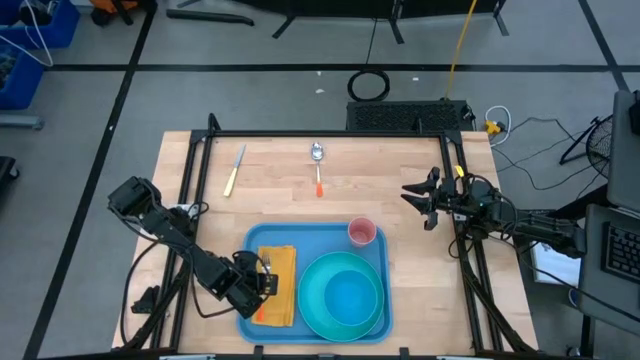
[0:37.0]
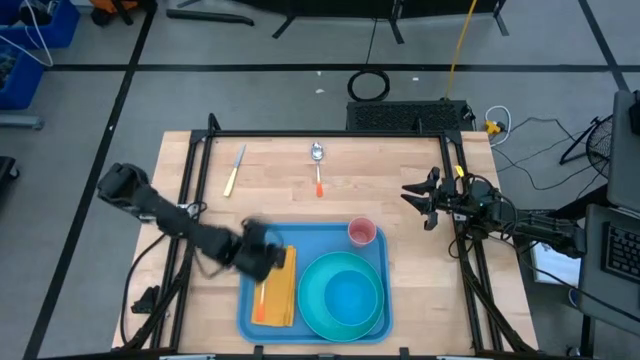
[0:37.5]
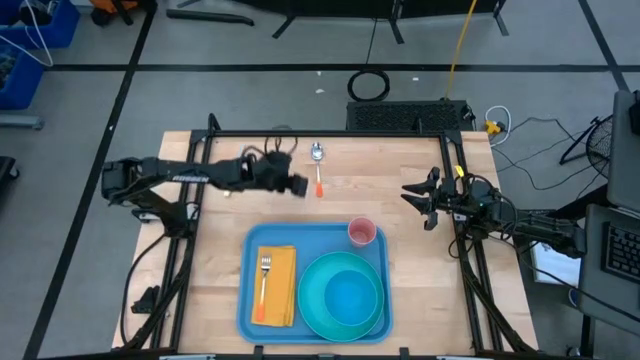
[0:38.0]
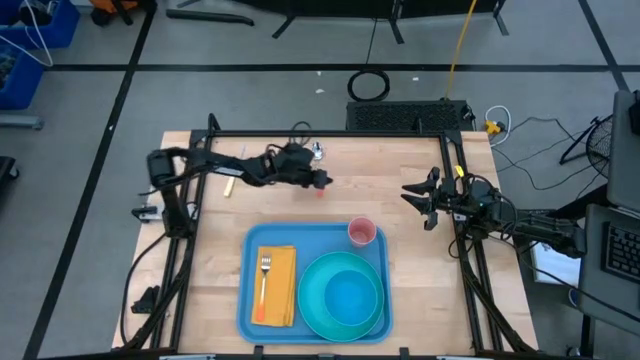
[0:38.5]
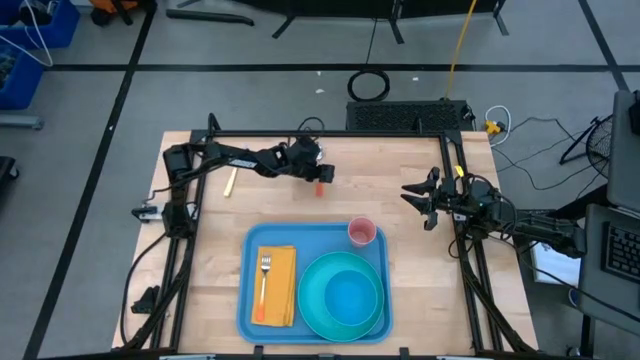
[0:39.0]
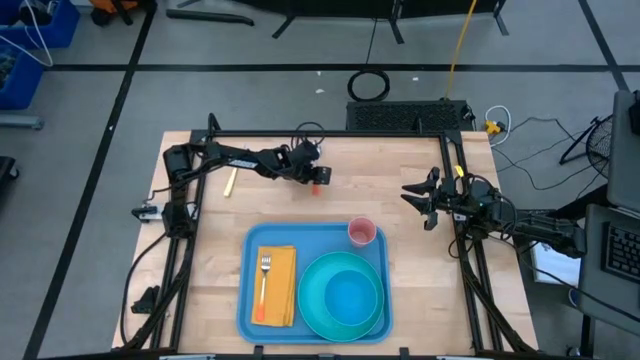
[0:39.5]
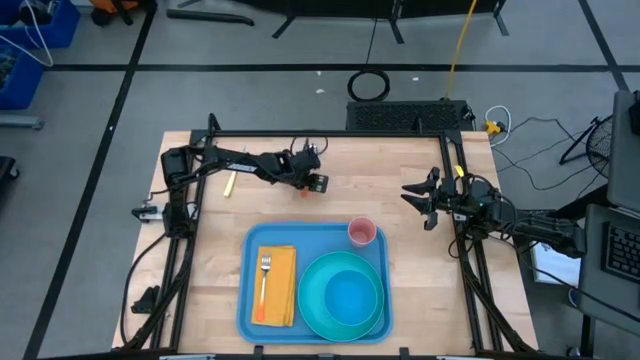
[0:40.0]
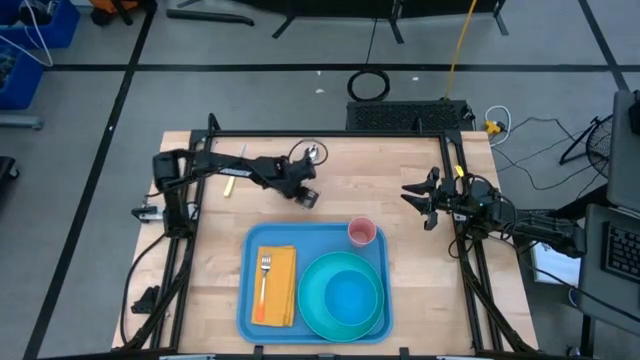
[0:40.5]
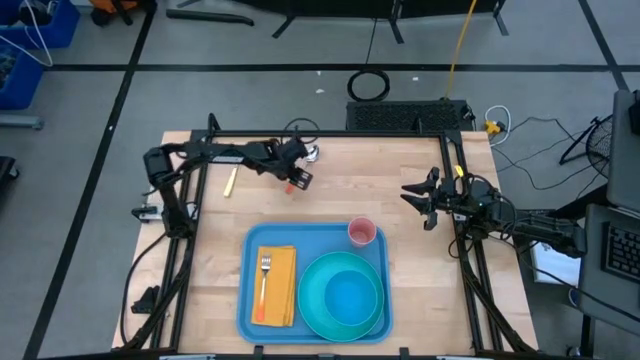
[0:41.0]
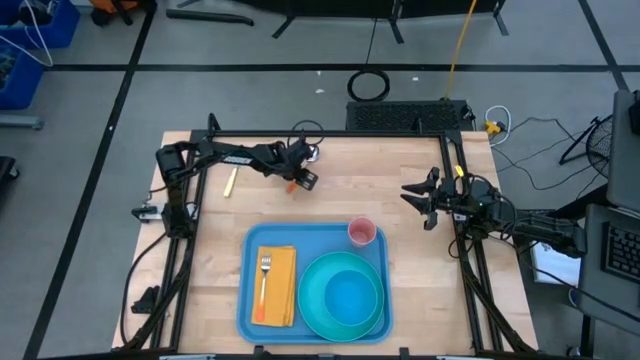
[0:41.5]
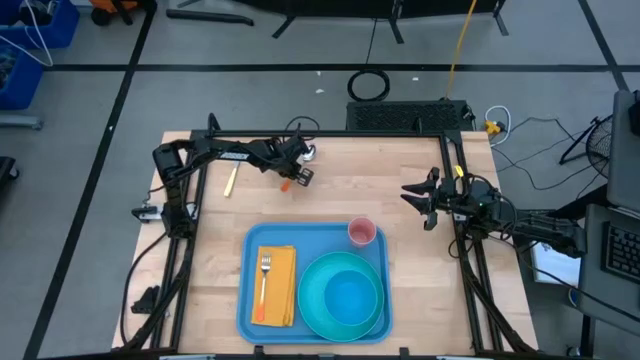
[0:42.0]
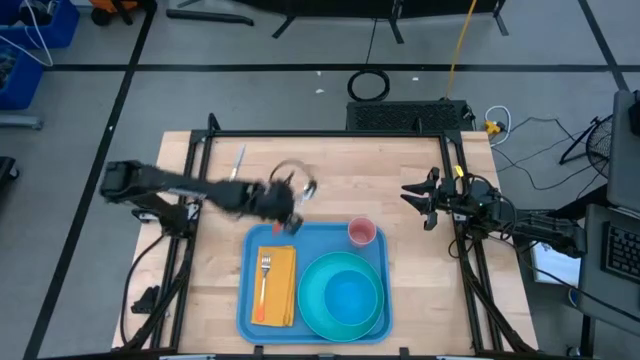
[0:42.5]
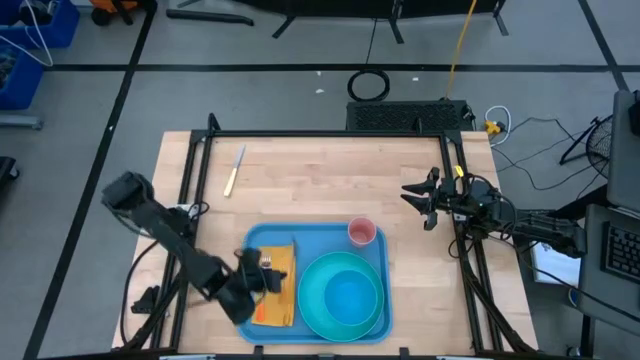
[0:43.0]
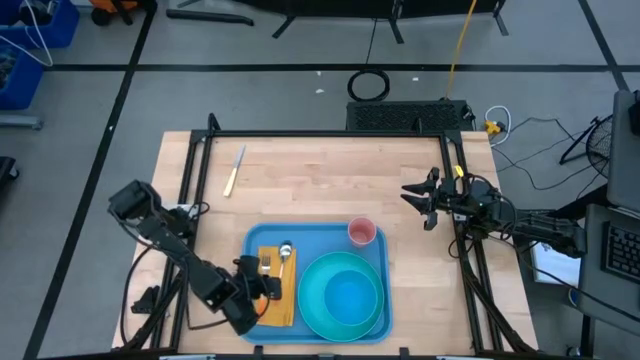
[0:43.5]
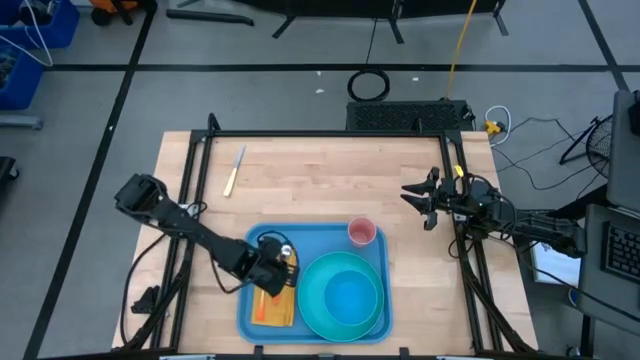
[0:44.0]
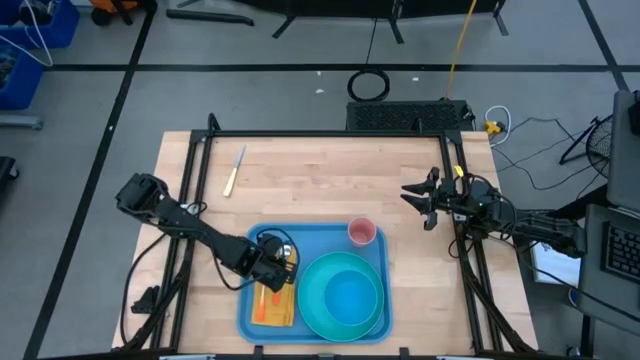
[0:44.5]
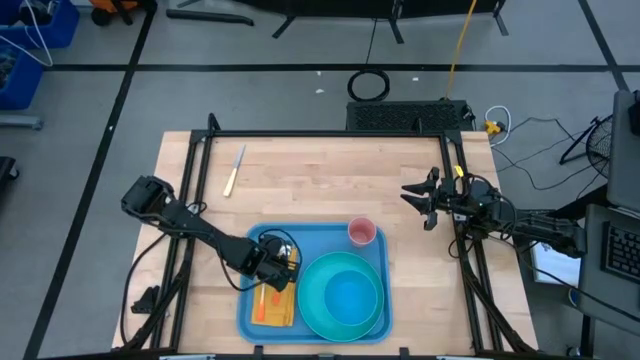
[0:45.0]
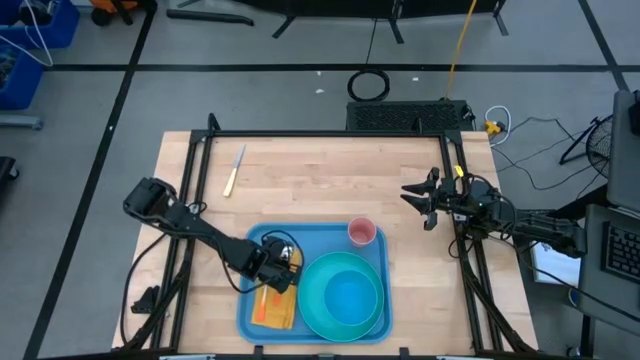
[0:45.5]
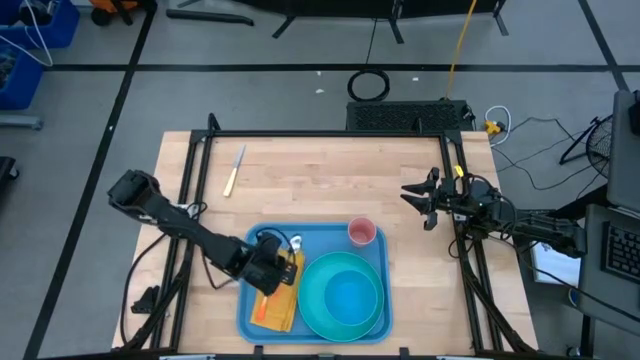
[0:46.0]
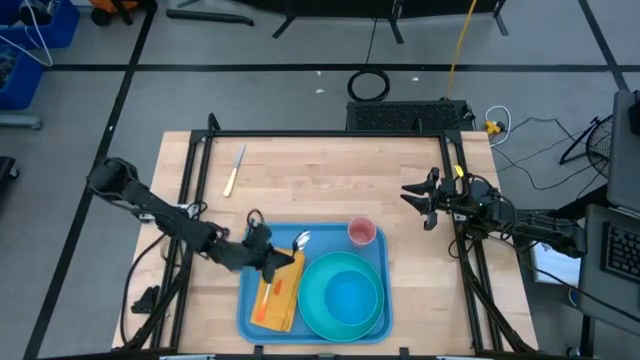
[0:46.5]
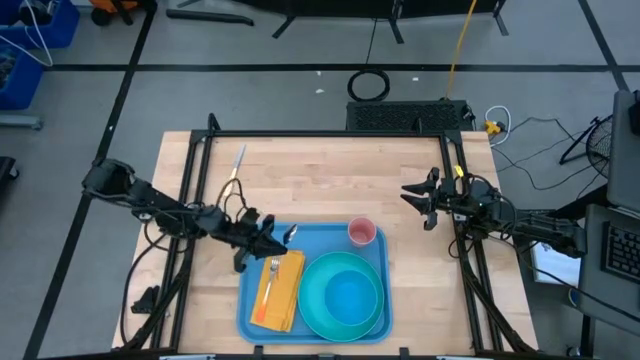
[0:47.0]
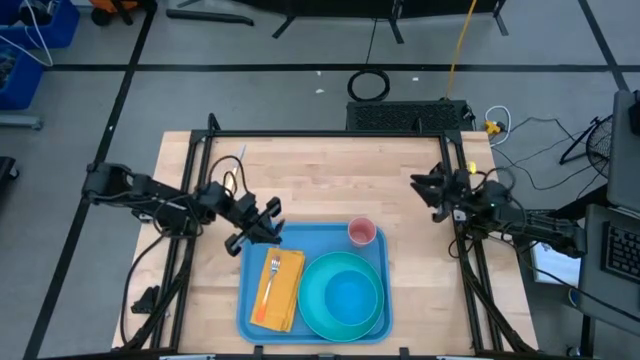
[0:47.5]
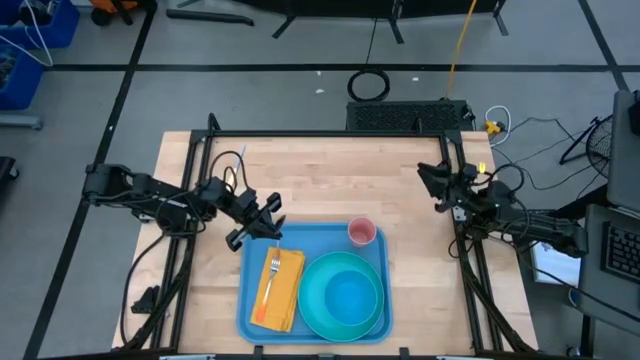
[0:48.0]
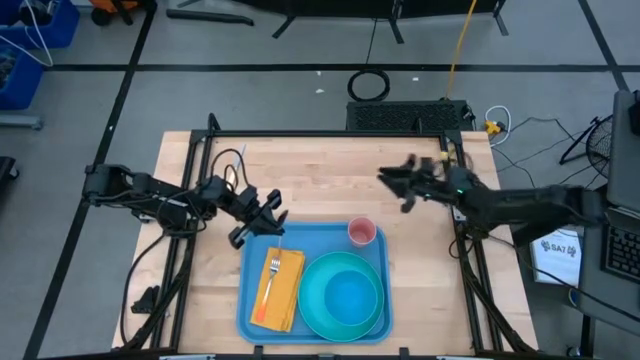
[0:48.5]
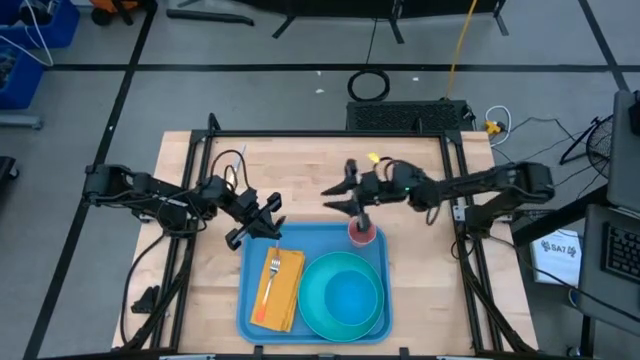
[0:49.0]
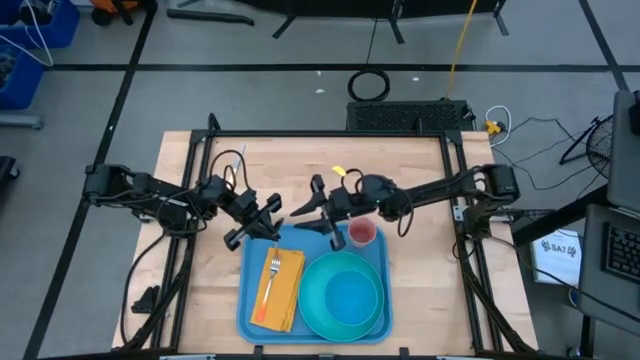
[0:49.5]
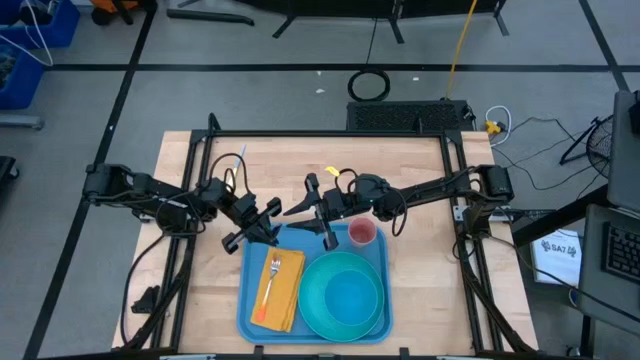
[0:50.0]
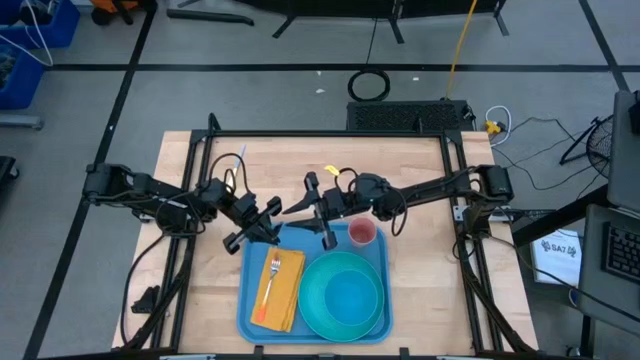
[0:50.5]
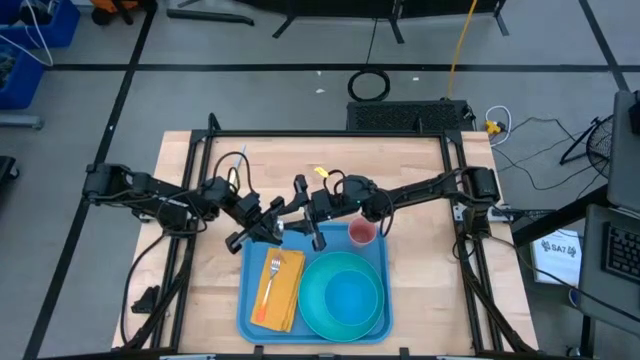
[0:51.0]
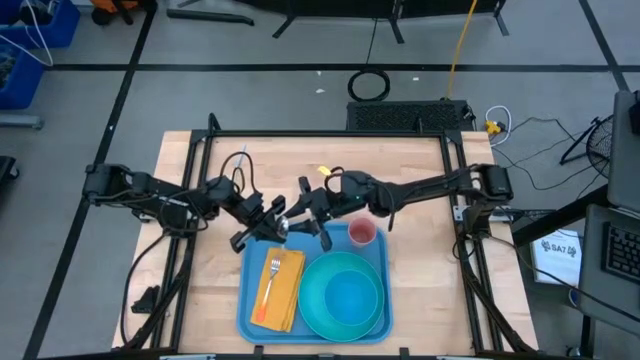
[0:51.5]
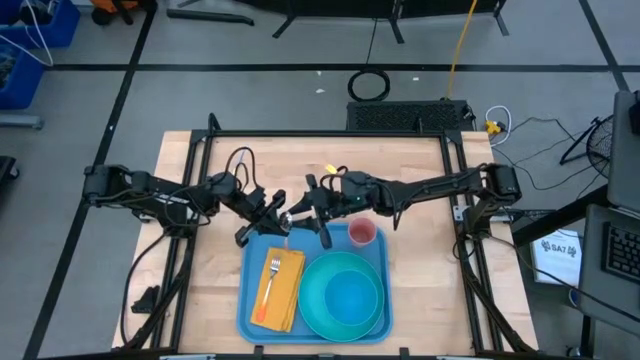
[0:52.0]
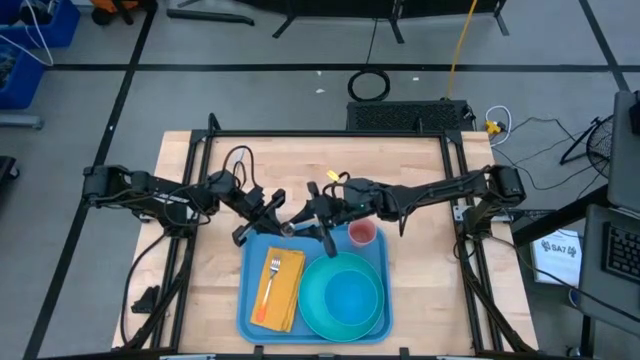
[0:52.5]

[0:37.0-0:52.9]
Task: Set up tray
Put the orange spoon on top of the yellow napkin to the right of the orange fork

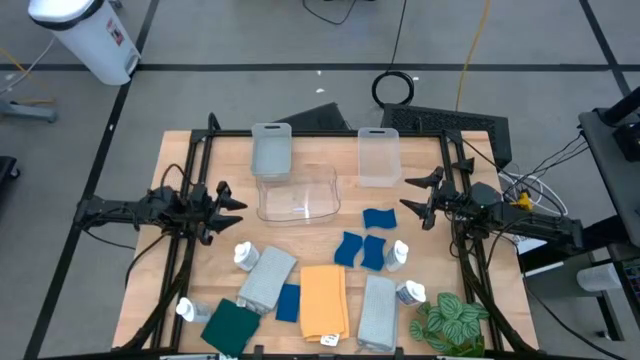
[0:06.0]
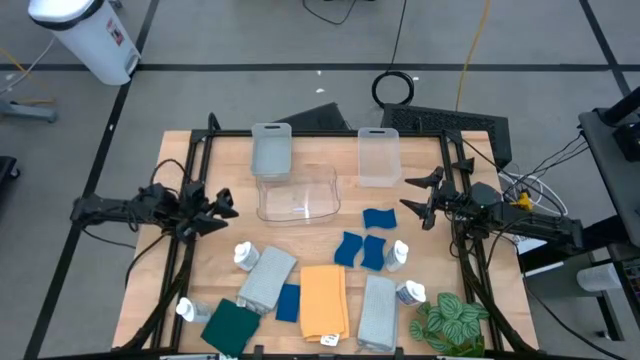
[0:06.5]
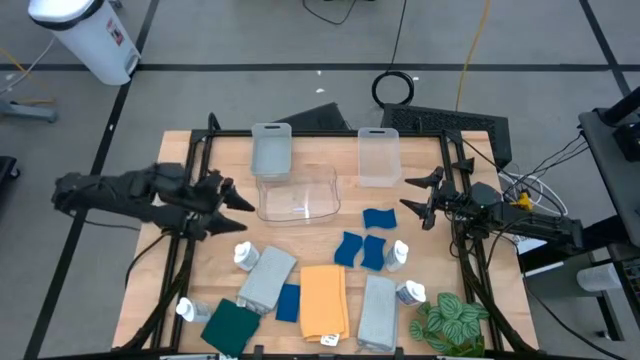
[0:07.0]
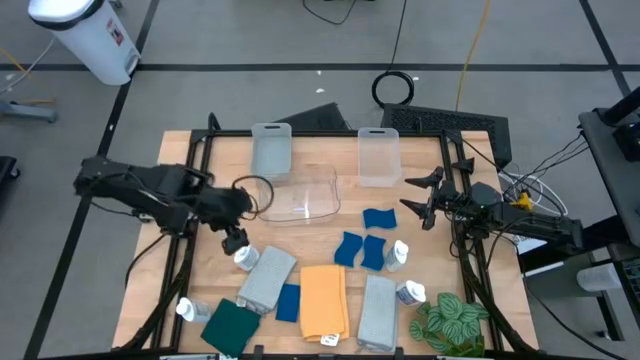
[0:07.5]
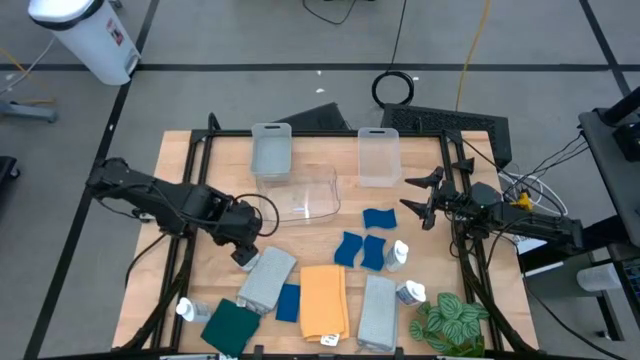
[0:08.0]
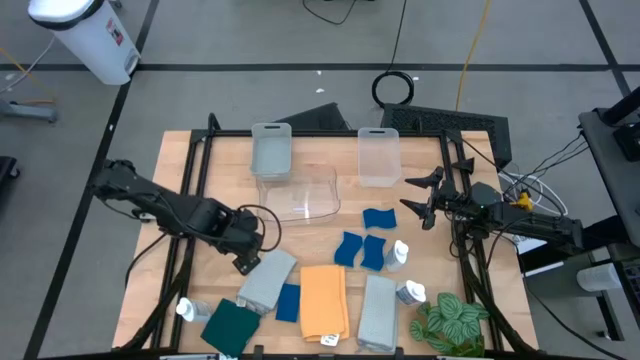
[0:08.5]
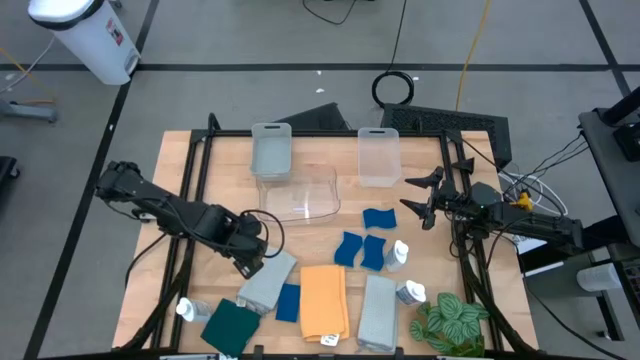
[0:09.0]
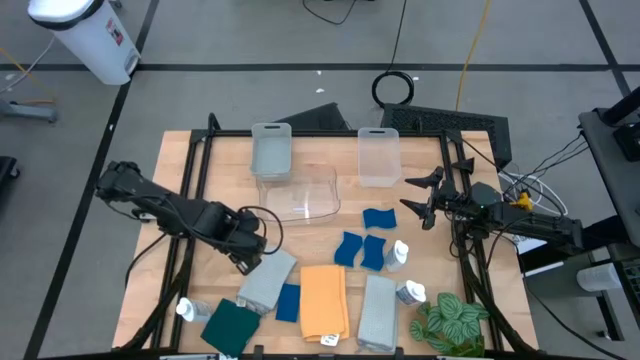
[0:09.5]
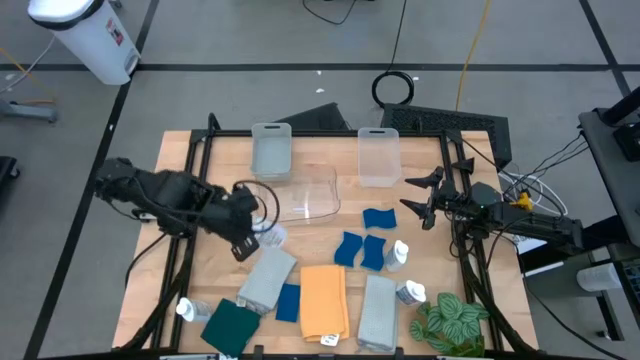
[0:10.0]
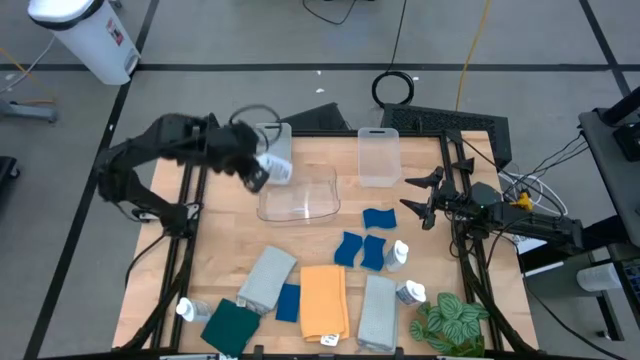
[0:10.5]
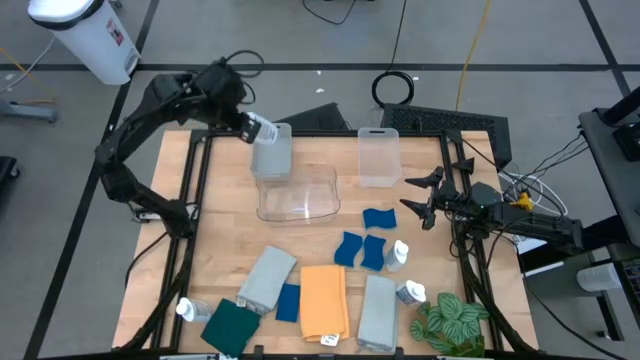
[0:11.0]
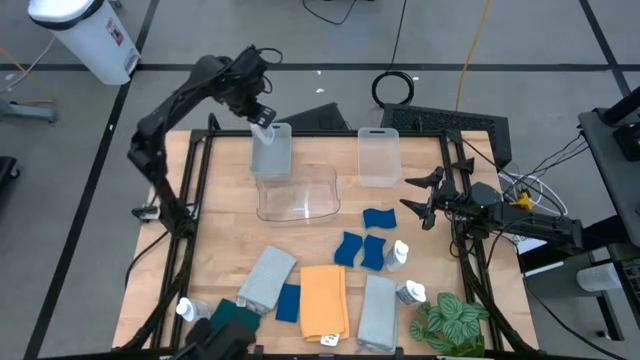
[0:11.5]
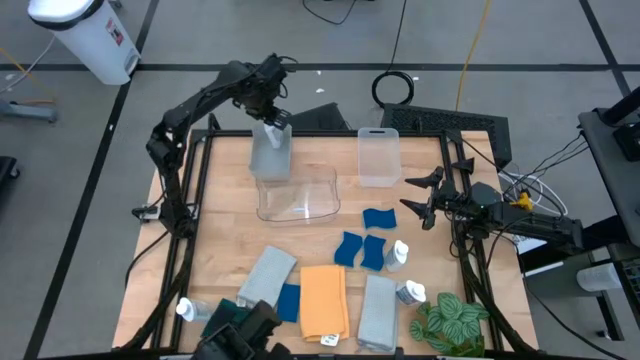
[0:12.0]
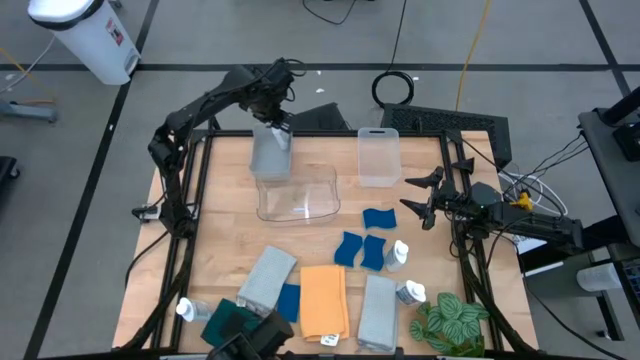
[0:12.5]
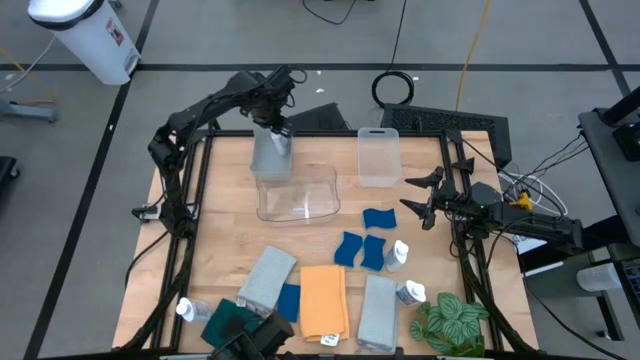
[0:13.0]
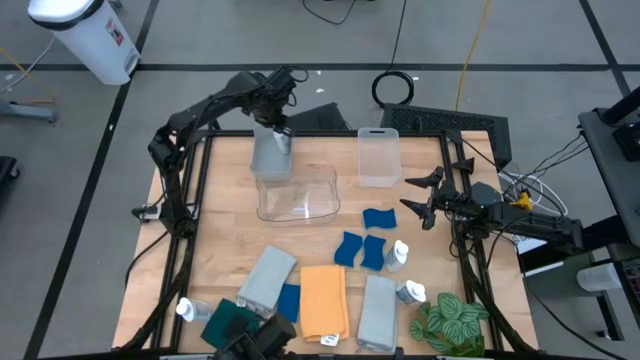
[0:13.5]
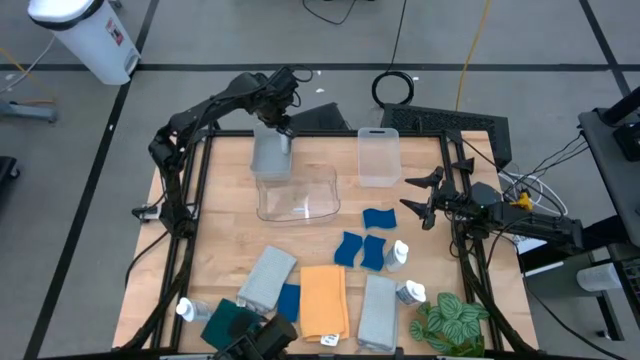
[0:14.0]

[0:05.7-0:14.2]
Task: Pick & Place Kitchen Items
Put the white plastic restorer bottle into the gray bin
